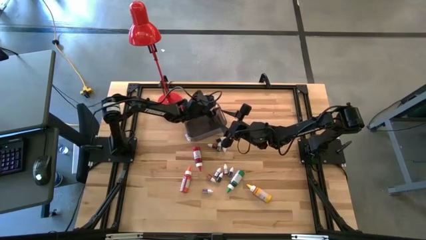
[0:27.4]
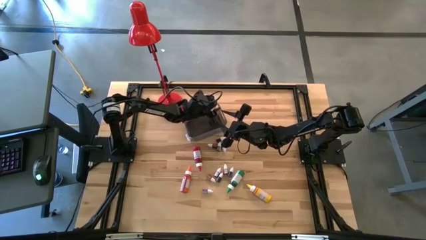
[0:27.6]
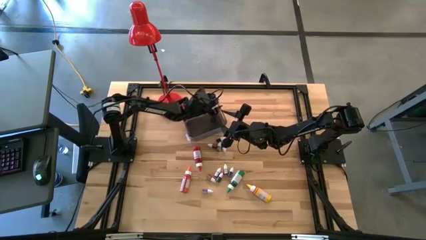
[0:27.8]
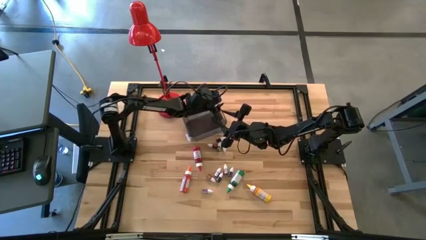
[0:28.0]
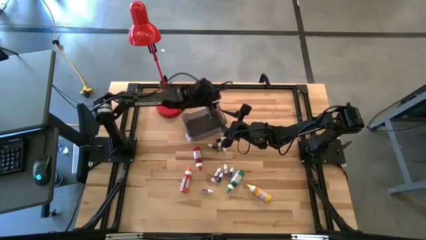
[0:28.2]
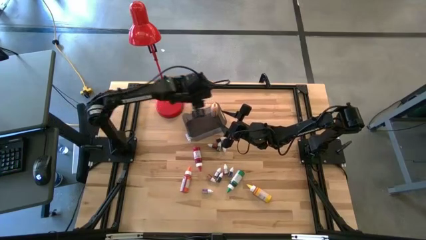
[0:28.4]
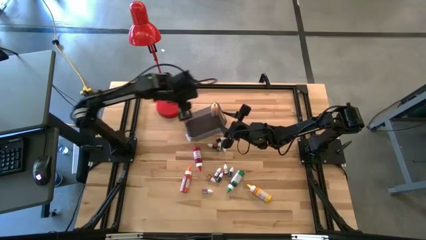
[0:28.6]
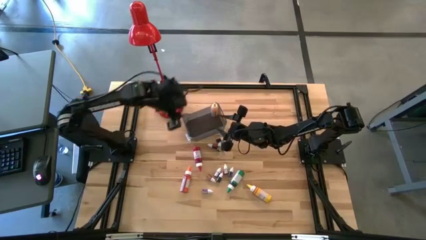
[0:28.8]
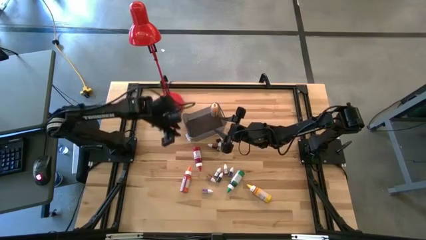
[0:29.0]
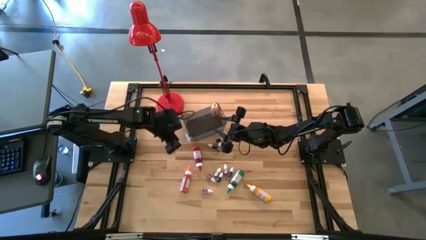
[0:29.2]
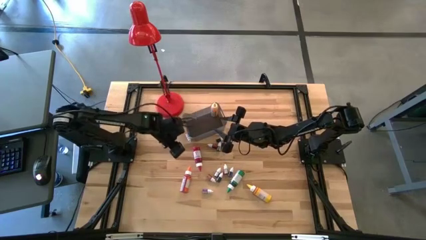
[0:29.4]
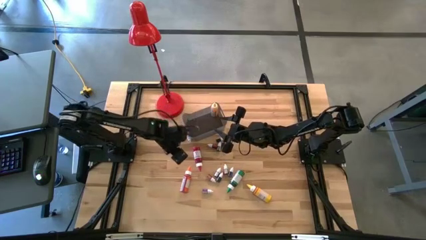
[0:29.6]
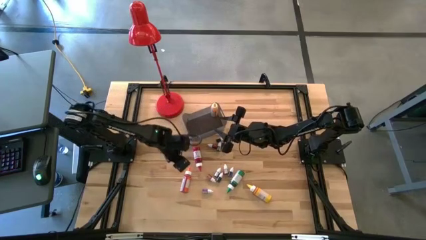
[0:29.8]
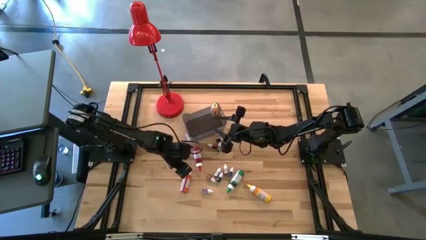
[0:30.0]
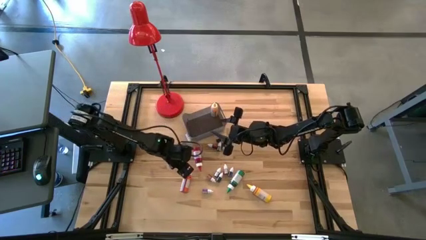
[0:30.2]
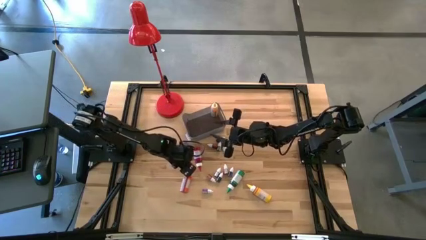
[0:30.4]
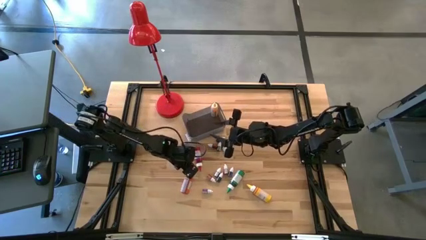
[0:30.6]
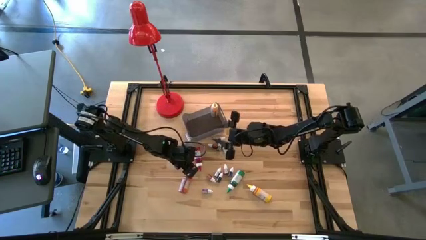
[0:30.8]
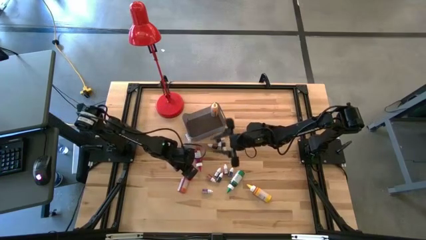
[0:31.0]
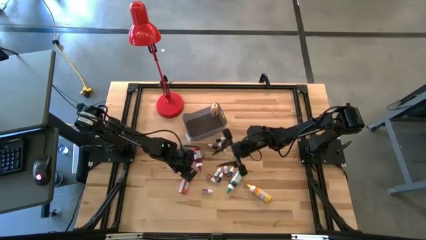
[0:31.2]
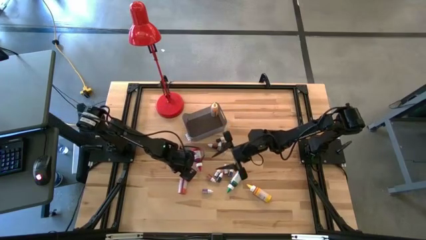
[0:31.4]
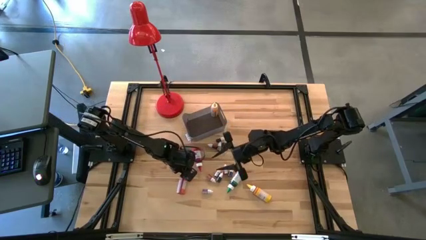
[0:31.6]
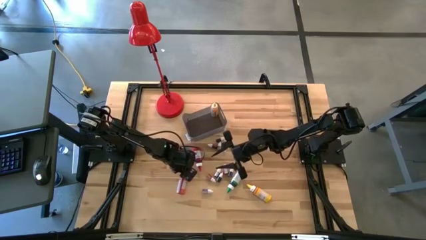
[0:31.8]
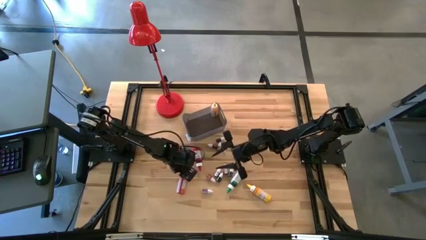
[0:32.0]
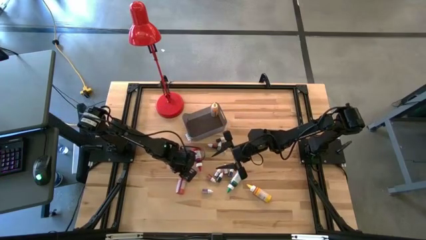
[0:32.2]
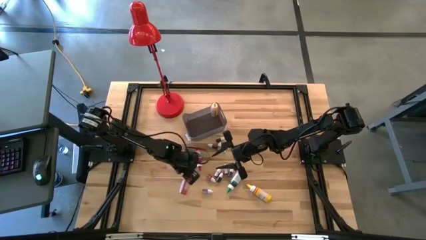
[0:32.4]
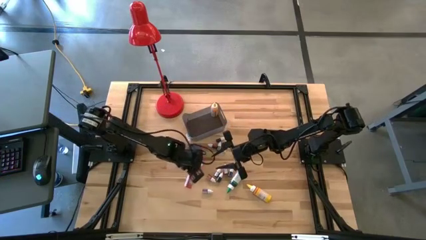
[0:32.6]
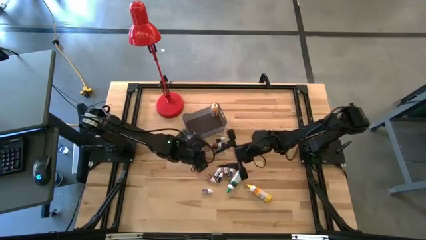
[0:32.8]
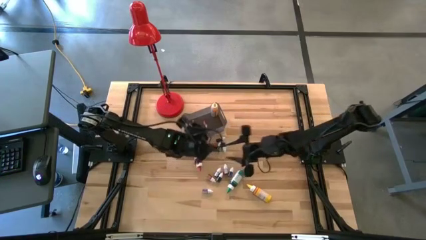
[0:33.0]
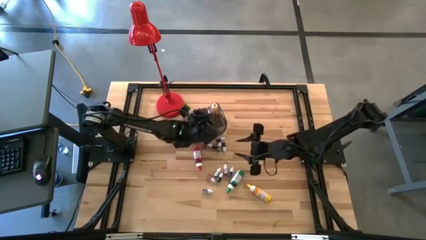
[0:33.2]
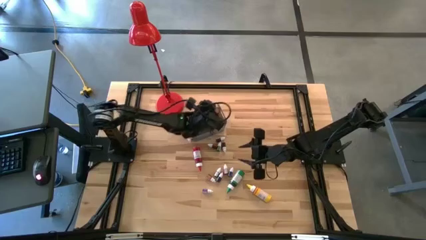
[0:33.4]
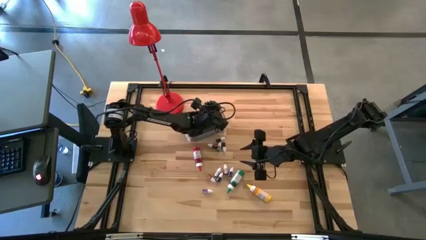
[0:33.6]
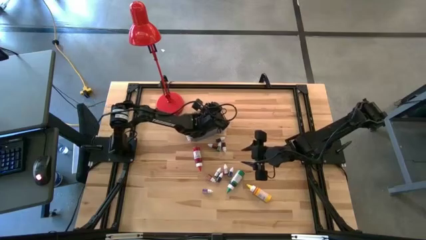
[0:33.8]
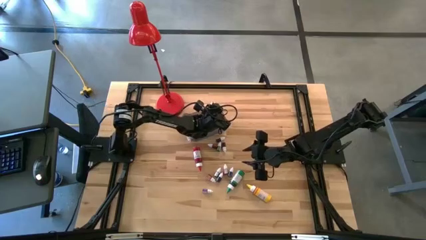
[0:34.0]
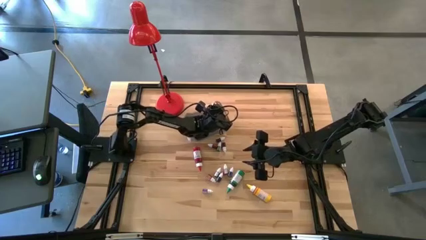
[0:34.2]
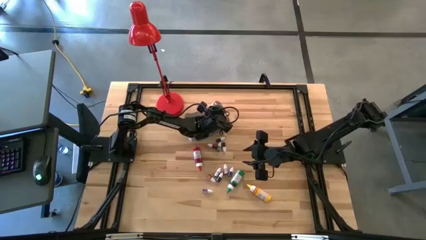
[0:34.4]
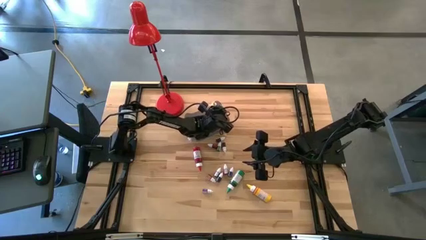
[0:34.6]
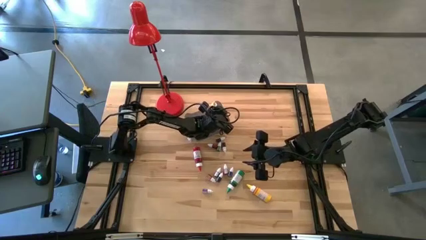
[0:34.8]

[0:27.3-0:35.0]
Task: Pick & Place food coloring
Put the large orange food coloring bottle into the bin

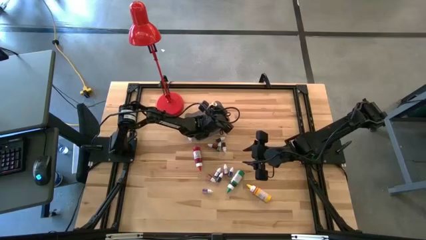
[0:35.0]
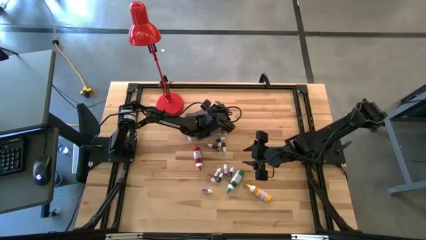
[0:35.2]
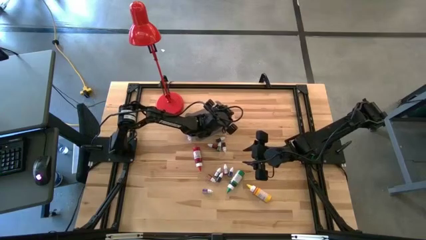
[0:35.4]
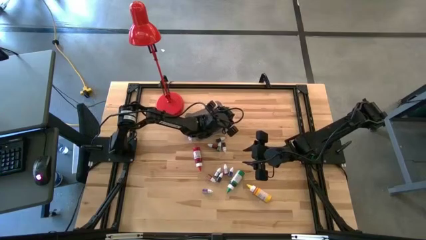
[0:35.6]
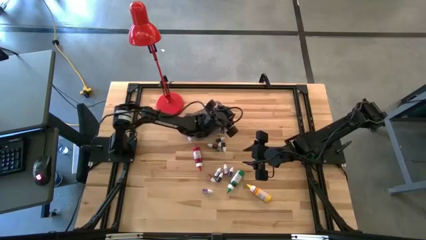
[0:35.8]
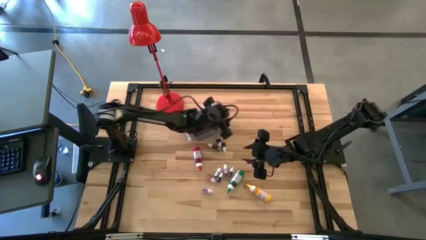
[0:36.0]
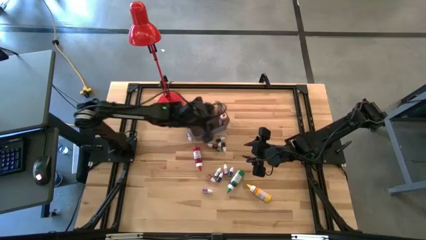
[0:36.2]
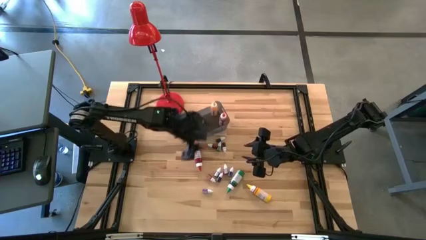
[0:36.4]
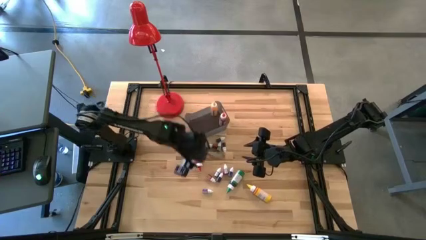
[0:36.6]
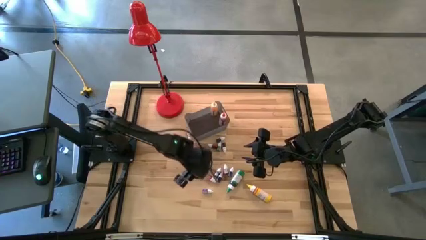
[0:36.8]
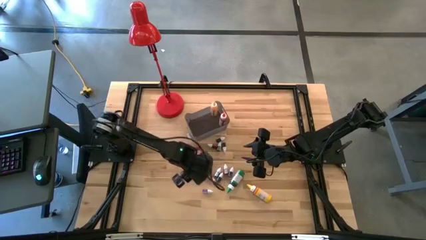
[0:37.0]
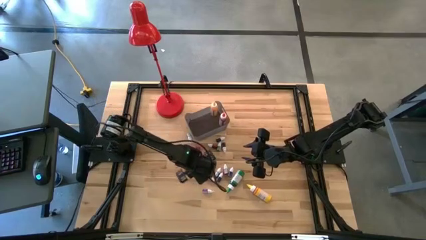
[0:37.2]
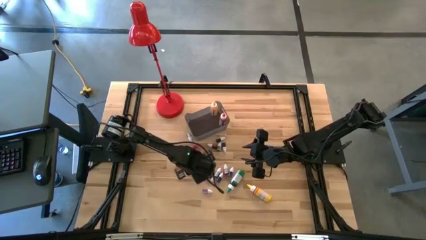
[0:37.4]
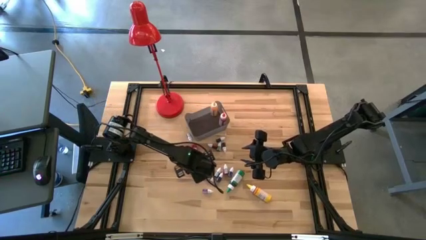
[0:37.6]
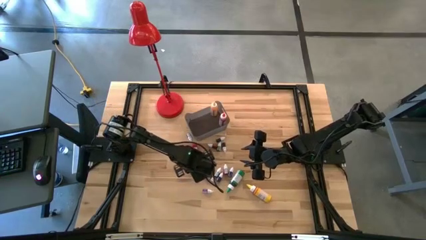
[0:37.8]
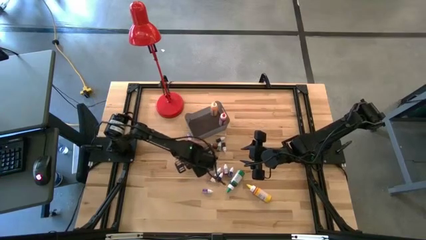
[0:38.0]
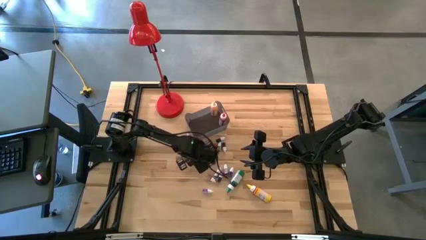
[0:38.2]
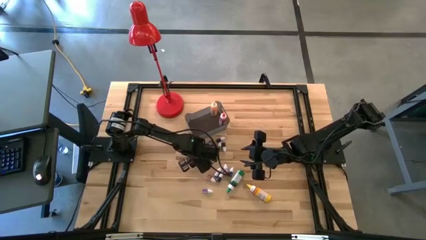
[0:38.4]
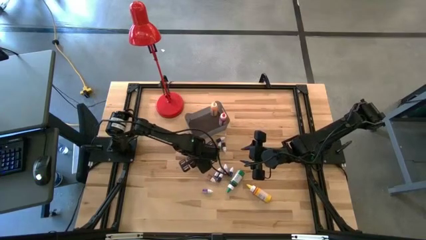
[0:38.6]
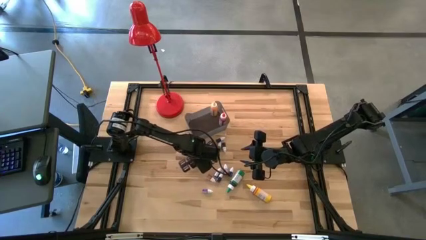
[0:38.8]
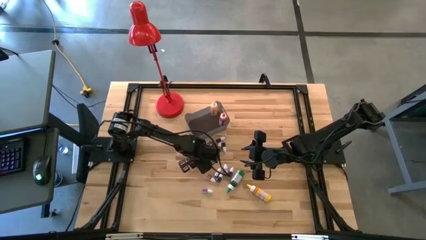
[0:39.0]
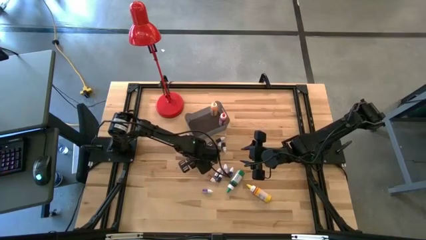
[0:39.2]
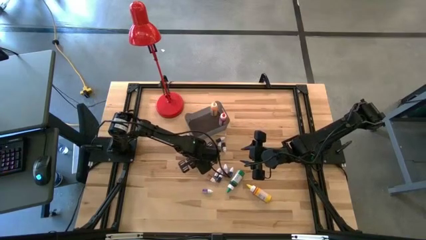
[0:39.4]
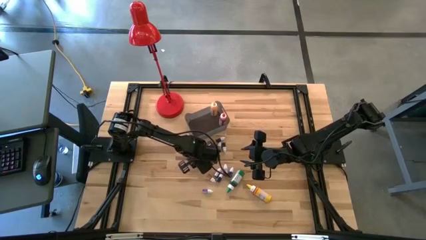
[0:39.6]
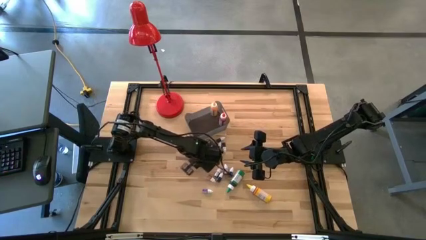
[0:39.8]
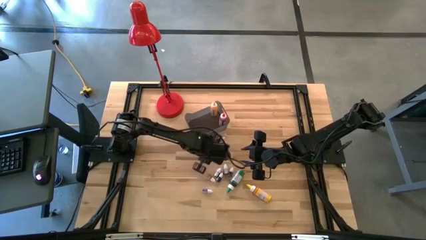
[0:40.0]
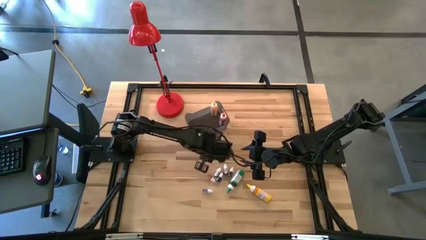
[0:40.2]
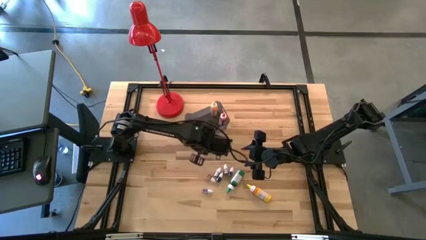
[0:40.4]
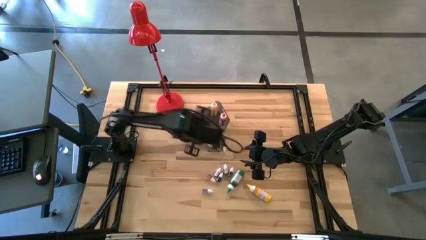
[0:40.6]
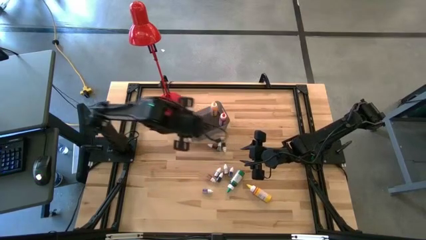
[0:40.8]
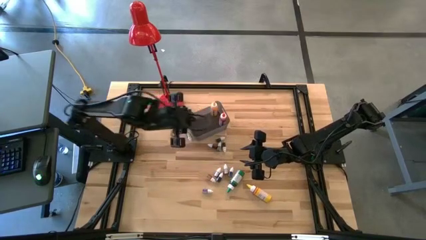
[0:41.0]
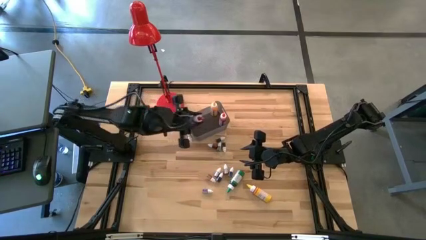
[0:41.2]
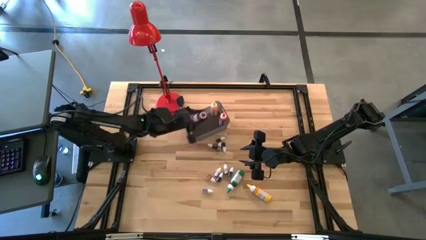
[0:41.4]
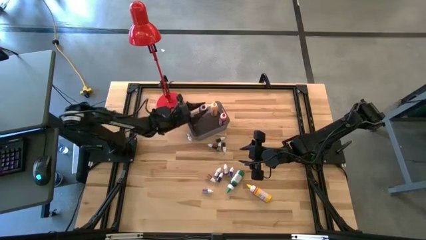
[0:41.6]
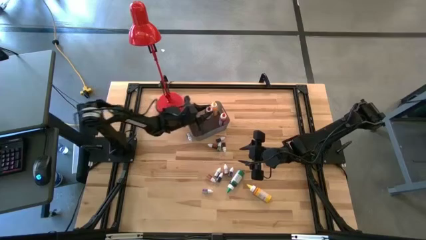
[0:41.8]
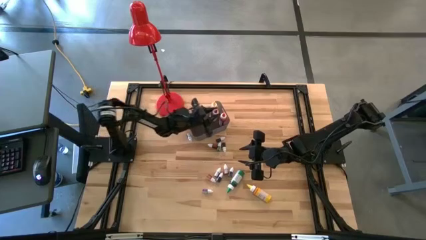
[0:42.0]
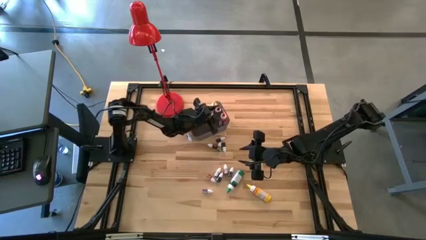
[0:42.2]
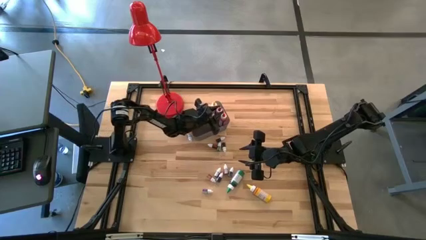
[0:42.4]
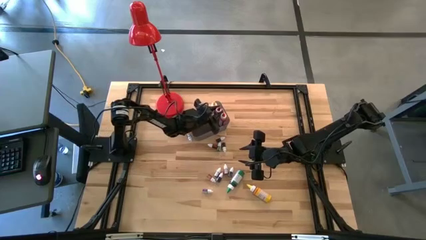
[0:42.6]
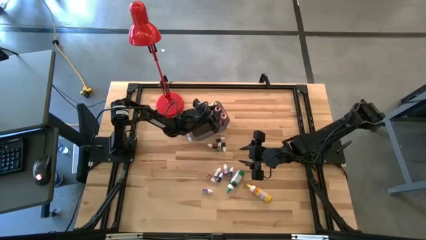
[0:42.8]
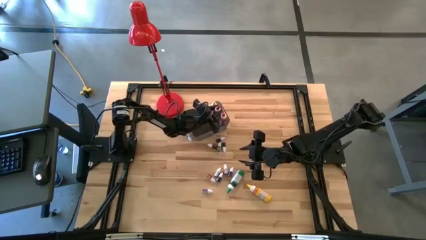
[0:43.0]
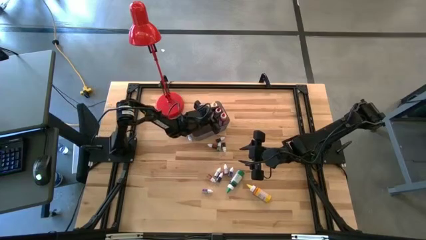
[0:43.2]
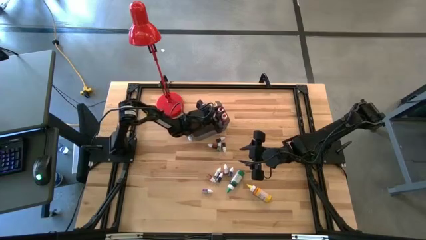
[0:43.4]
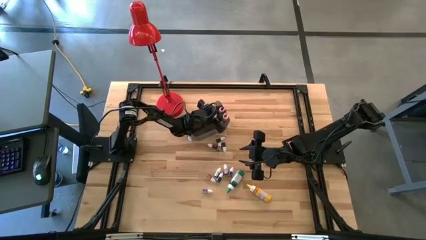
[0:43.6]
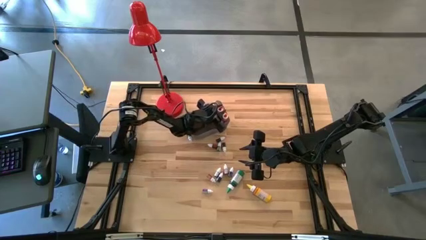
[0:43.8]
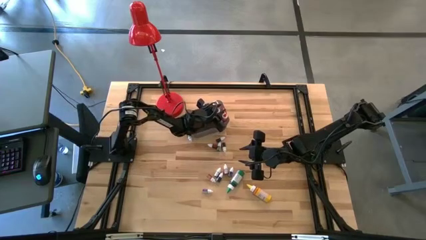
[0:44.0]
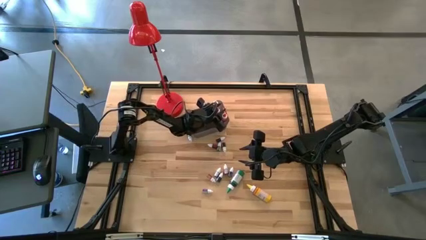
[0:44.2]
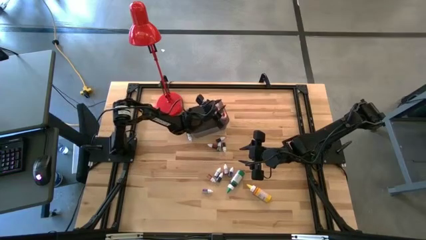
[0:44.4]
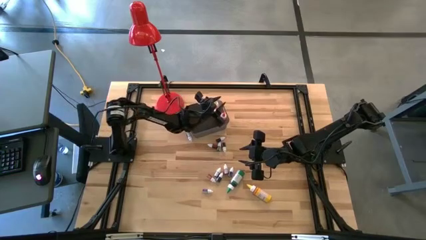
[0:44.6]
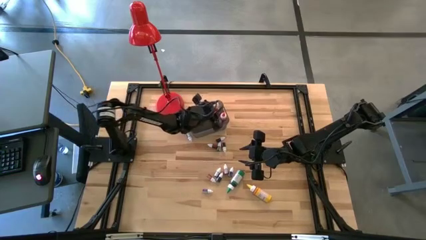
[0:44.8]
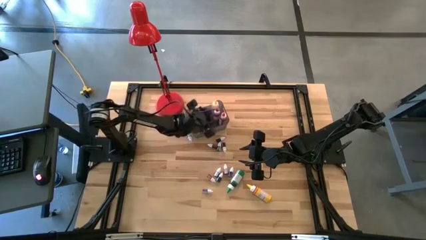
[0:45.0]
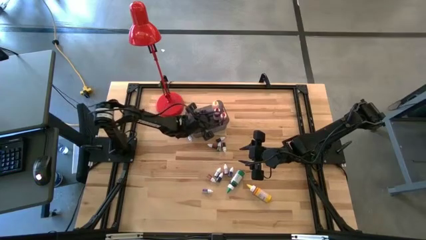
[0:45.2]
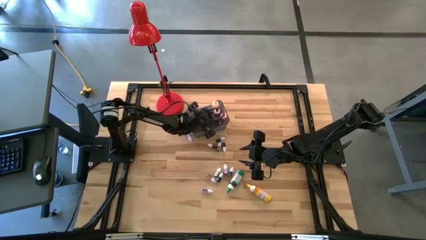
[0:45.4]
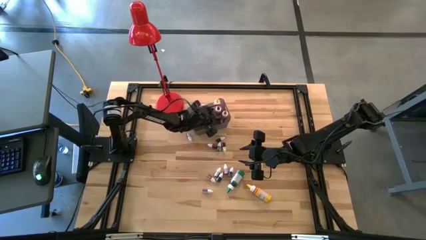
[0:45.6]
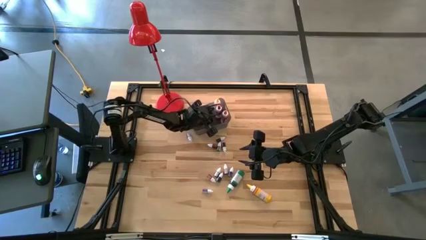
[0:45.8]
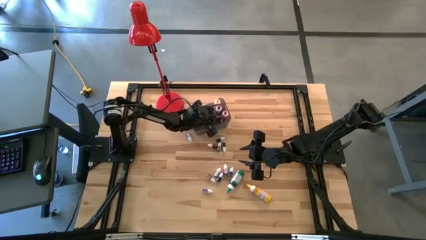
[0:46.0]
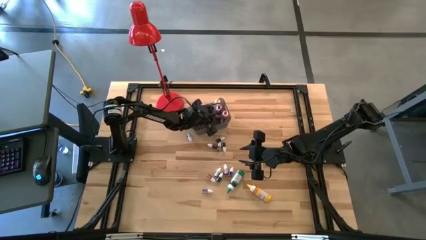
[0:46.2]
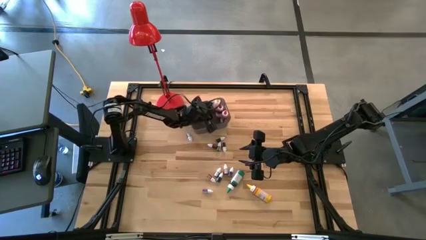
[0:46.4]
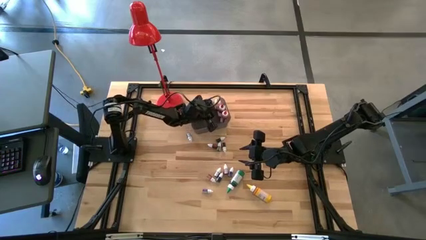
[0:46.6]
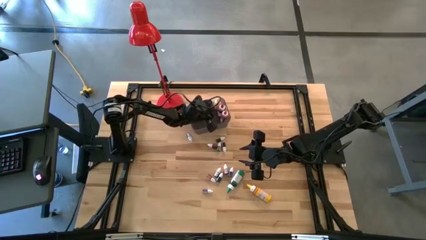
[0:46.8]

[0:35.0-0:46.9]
Put the large red food coloring bottle into the bin
